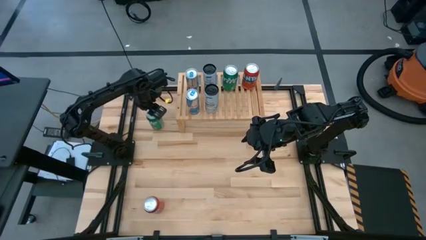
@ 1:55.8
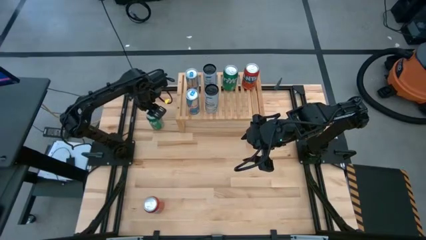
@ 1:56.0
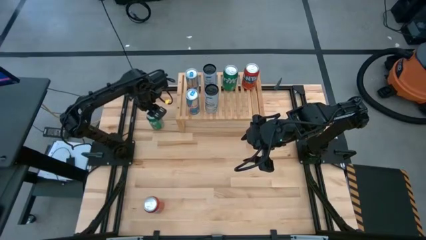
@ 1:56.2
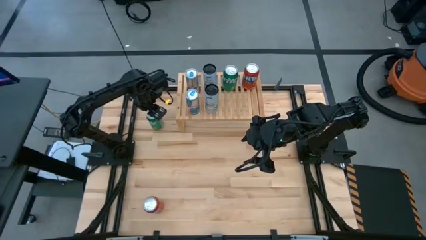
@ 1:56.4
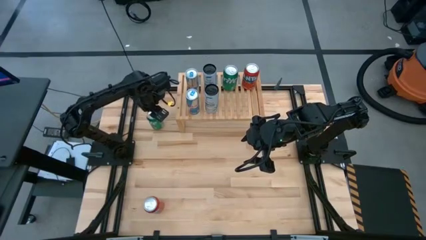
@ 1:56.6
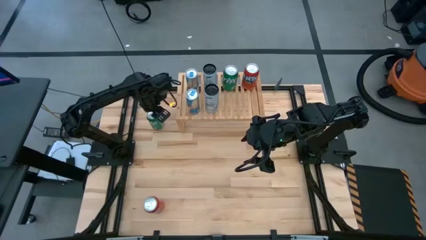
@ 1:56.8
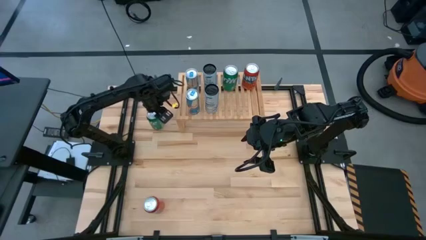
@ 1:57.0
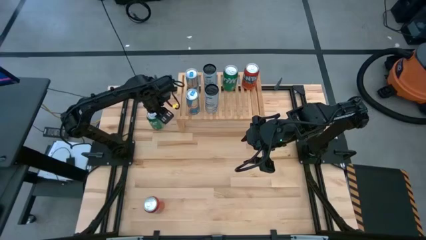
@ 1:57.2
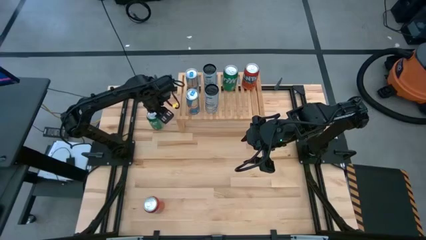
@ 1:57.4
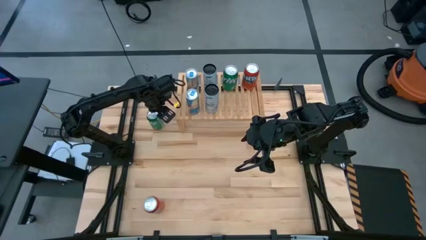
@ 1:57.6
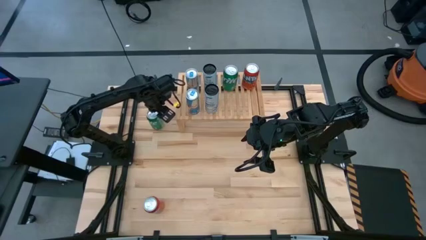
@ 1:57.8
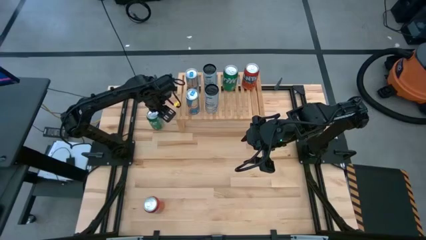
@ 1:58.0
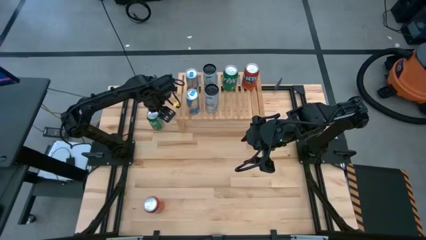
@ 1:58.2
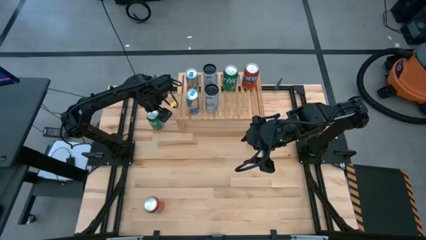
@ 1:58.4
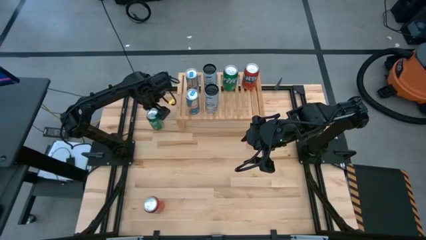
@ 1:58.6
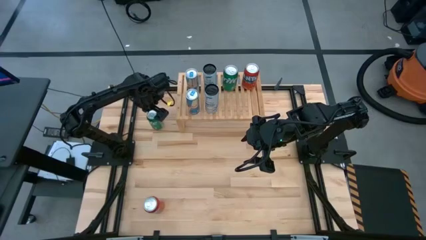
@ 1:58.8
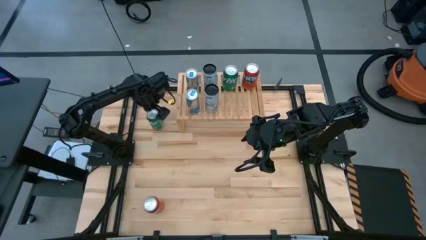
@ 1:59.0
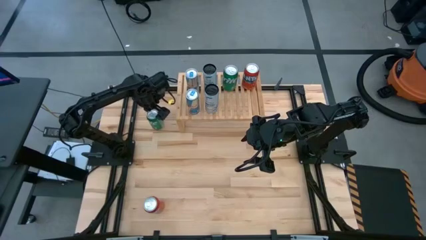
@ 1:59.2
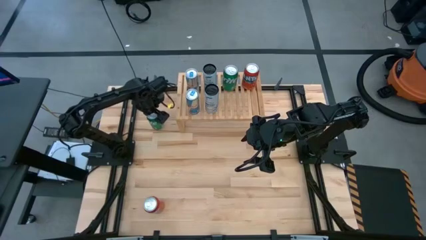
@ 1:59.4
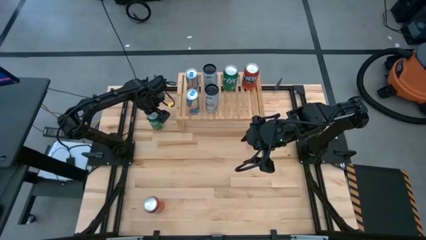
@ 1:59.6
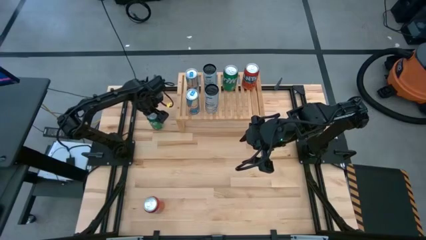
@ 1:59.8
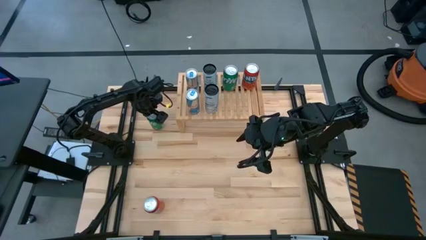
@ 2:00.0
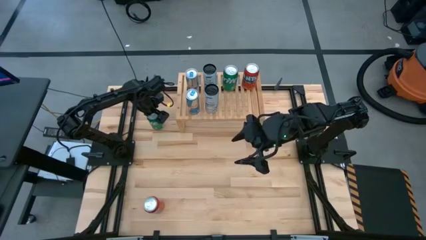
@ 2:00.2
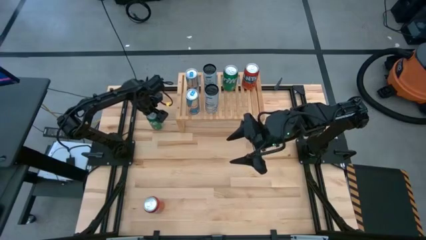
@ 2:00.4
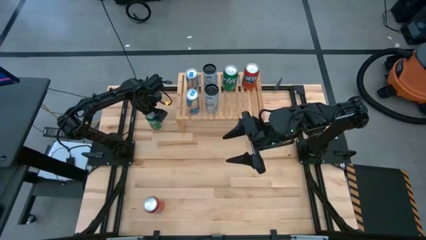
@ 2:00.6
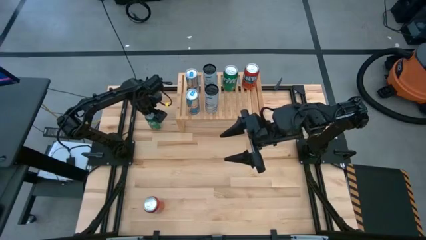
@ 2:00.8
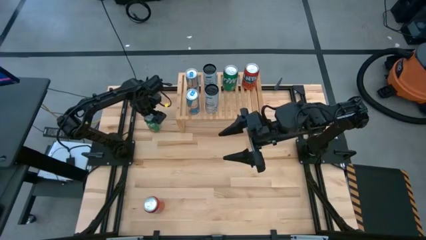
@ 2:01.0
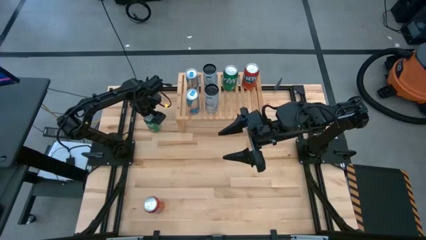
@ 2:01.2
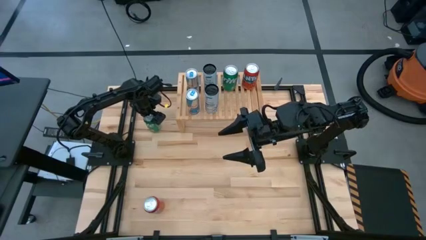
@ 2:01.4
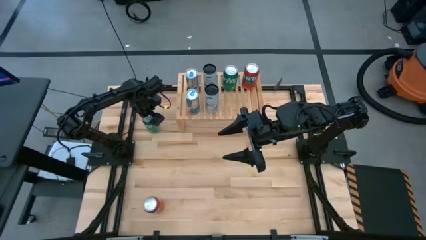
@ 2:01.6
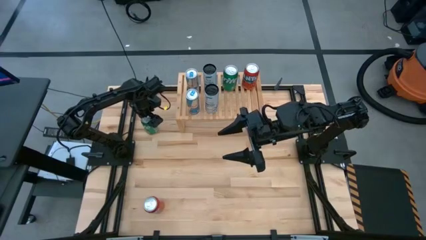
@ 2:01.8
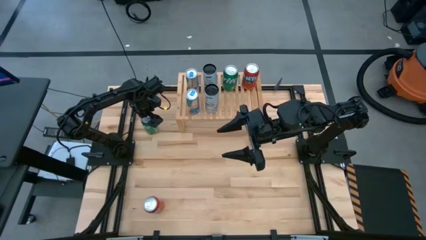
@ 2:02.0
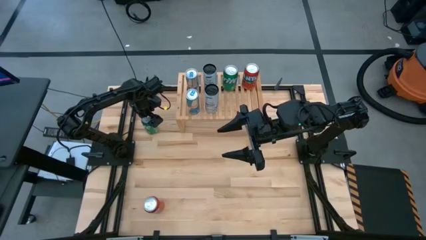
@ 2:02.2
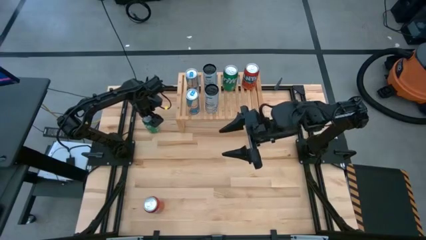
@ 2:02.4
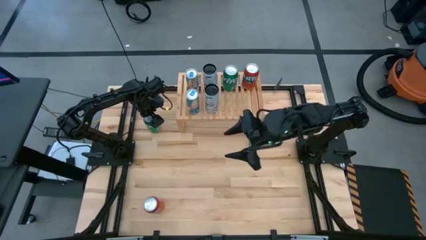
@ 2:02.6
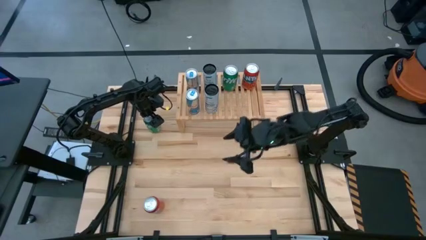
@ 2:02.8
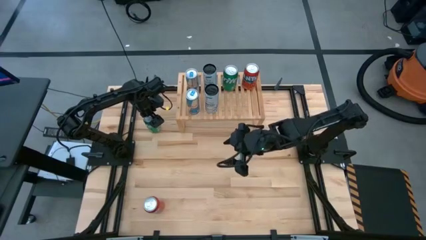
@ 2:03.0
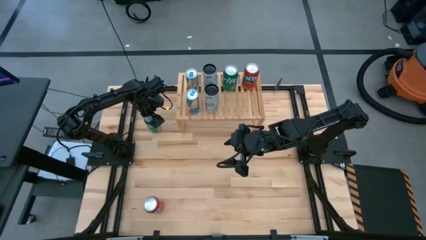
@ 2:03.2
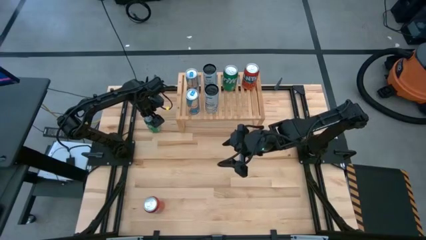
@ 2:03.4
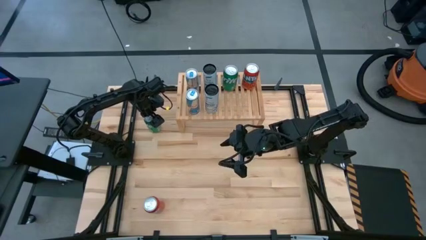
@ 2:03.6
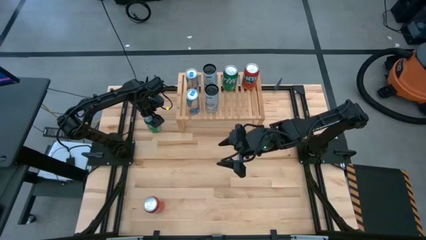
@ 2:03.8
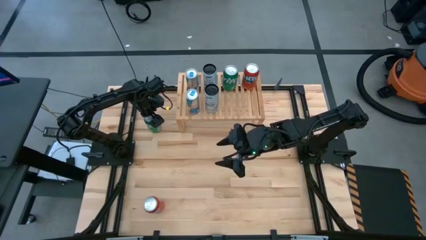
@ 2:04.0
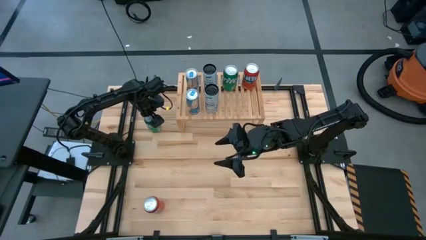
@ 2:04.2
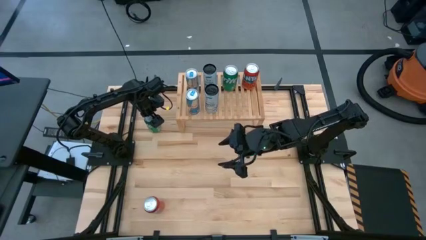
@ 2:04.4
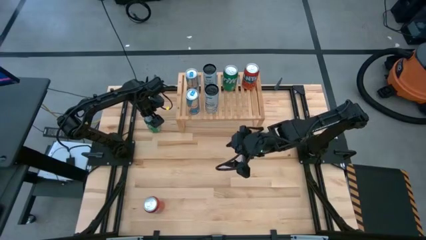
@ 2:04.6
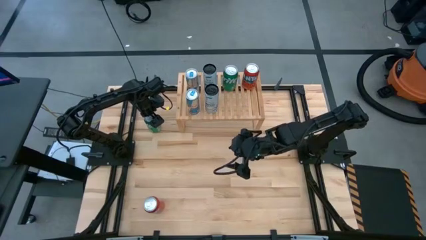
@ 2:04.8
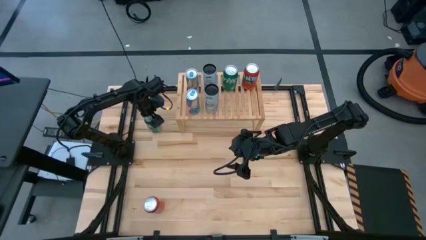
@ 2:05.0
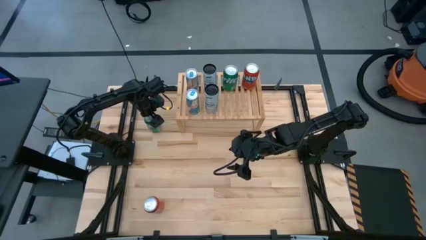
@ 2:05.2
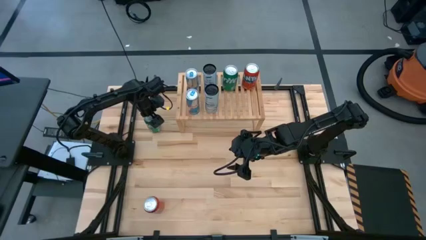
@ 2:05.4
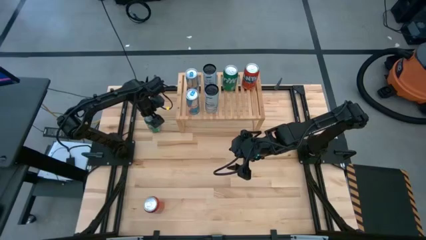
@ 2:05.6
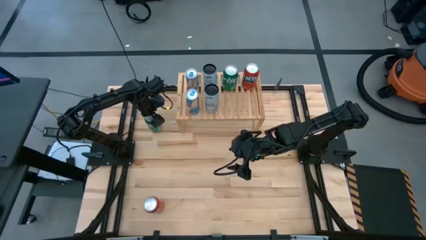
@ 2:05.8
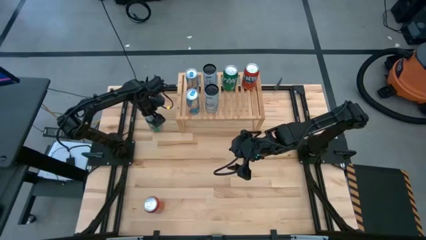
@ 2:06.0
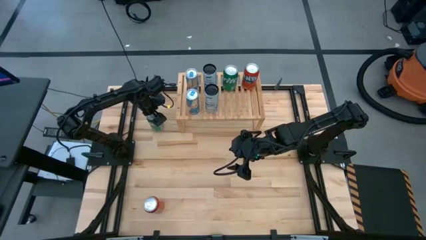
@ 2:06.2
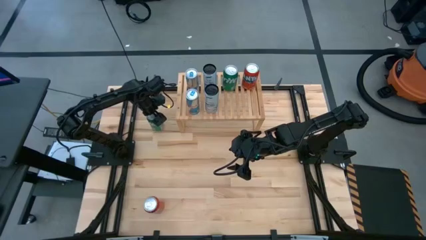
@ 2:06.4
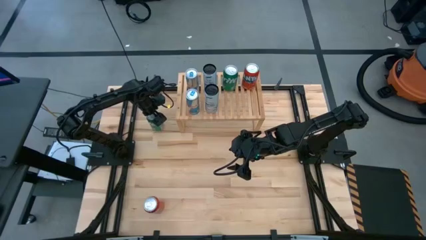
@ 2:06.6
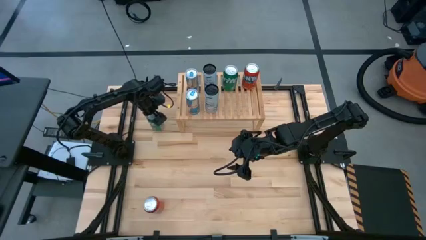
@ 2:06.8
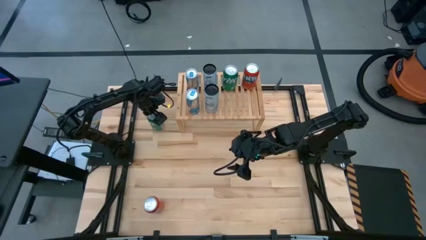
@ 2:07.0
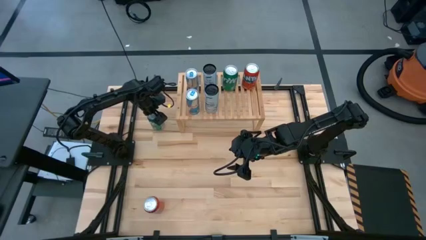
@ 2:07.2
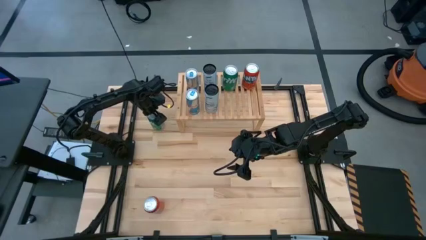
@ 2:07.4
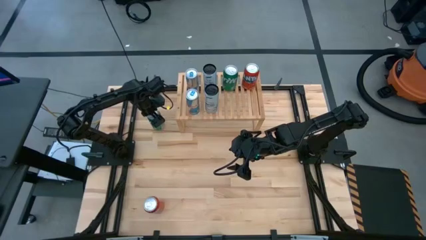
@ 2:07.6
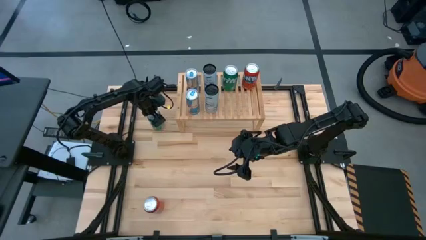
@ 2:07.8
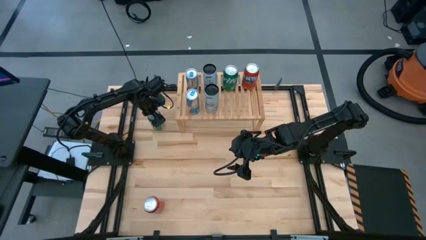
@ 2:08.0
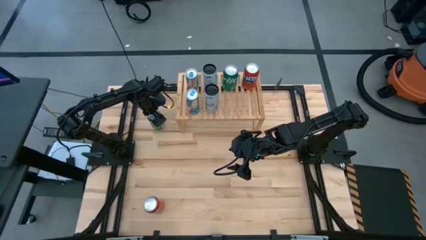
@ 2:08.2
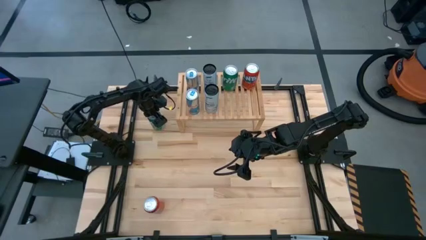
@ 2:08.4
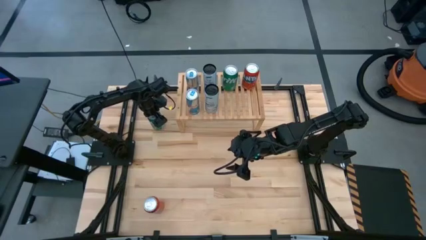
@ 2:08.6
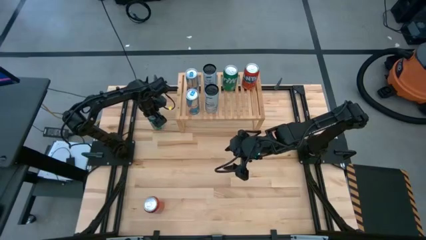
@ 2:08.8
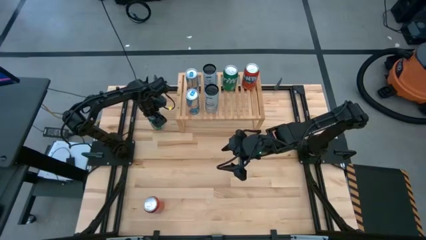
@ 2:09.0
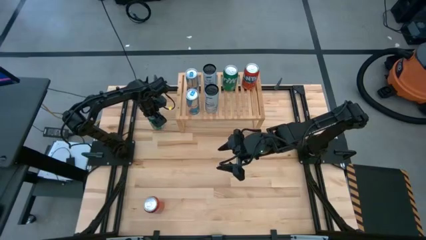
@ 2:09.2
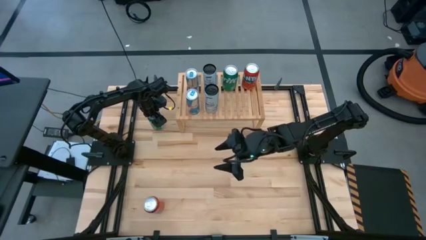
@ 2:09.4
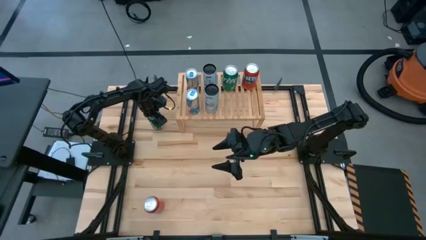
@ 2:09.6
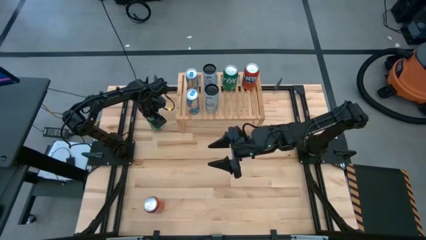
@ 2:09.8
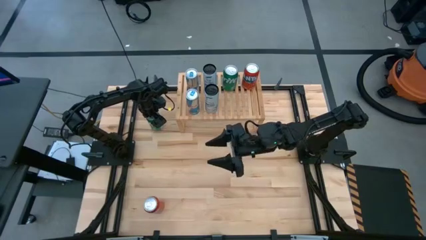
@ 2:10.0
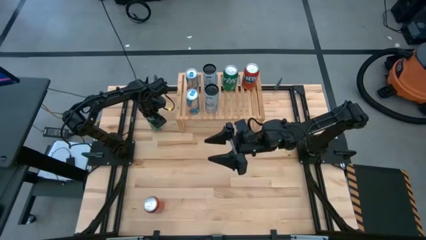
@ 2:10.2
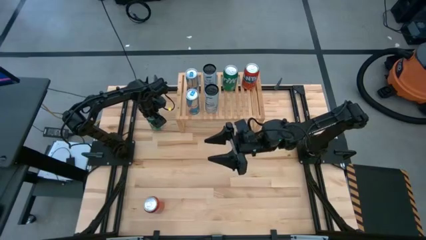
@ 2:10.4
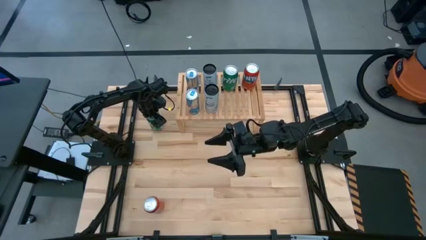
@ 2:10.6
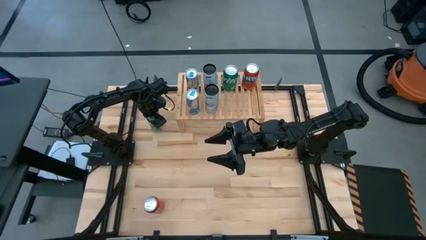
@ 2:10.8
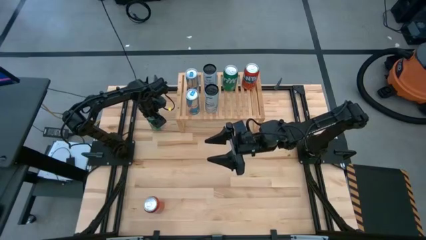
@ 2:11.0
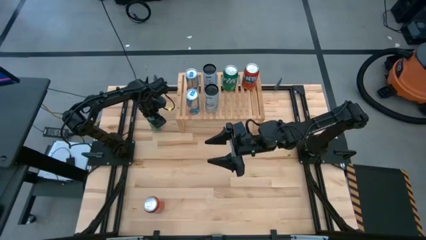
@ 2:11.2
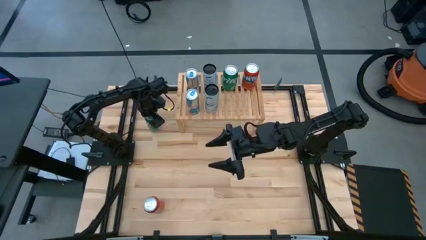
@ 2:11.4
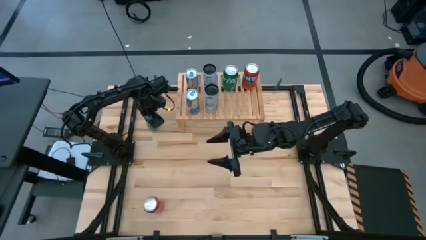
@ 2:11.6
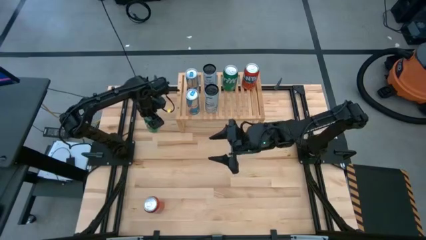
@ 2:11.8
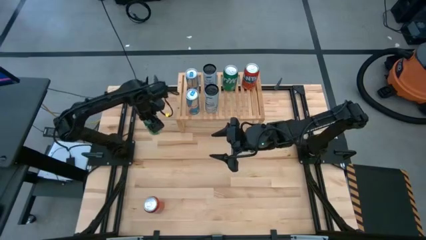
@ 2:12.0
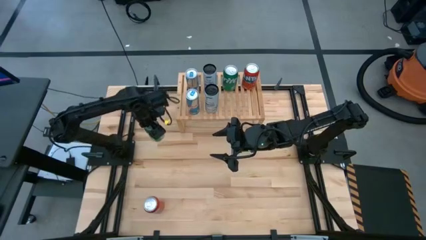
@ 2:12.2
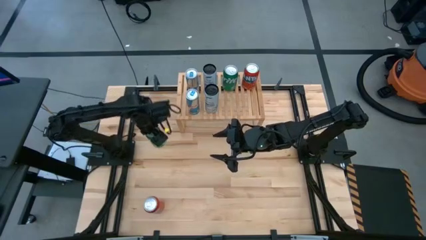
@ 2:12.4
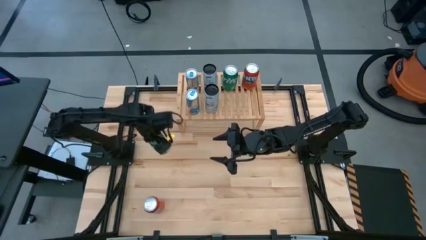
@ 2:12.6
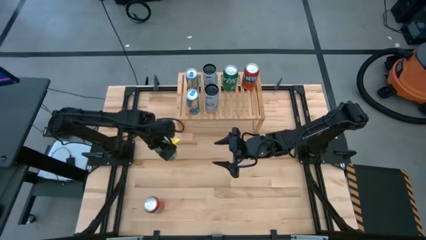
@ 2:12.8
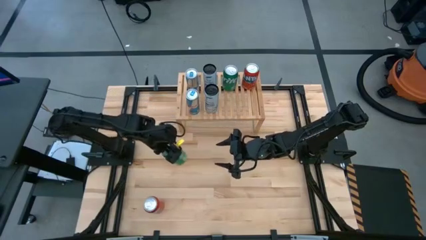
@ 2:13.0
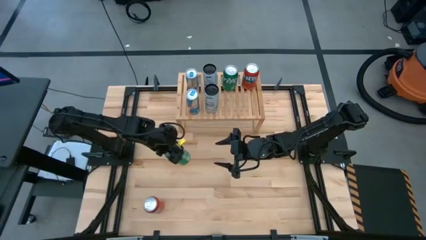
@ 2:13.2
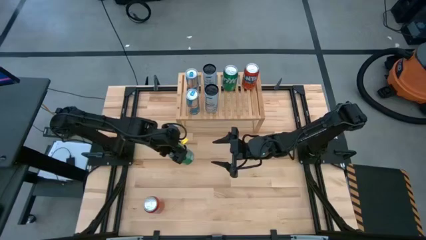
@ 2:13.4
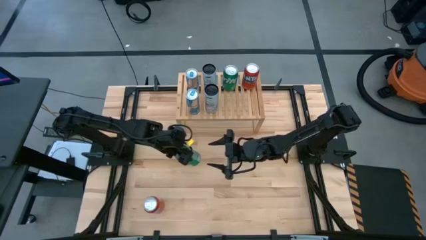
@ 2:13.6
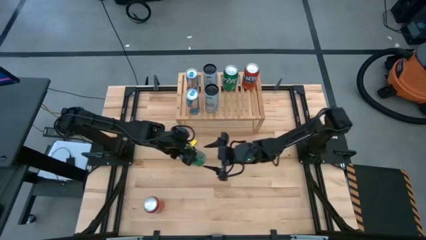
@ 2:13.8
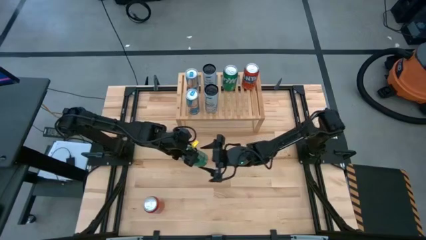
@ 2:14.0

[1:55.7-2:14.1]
Task: Place canned beverage on shelf
Put the green soda can aligned with the other green soda can on the shelf
